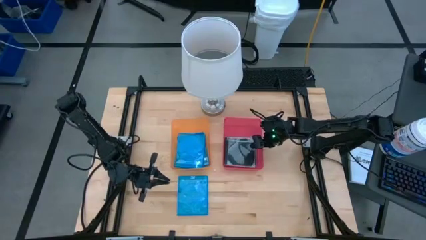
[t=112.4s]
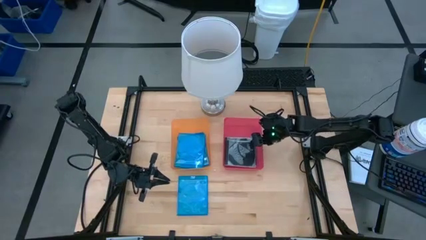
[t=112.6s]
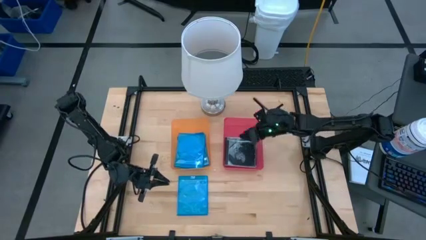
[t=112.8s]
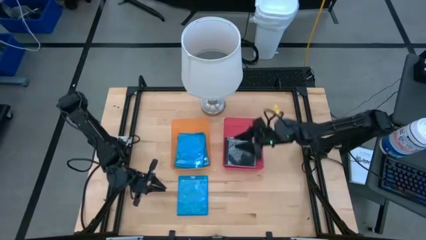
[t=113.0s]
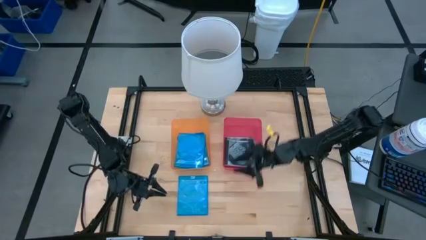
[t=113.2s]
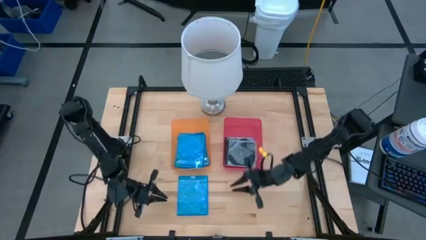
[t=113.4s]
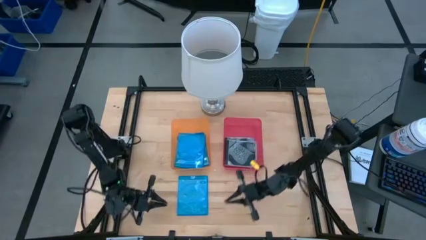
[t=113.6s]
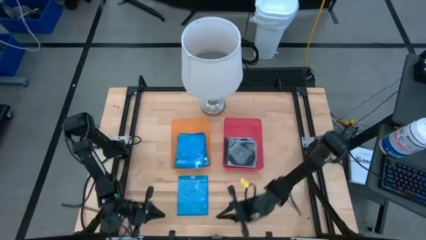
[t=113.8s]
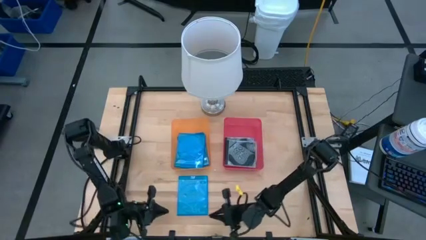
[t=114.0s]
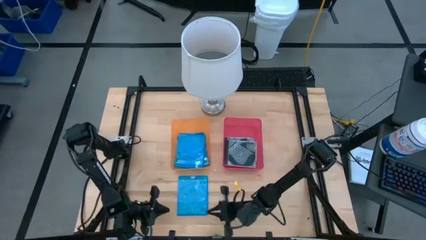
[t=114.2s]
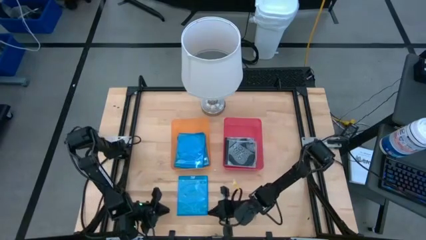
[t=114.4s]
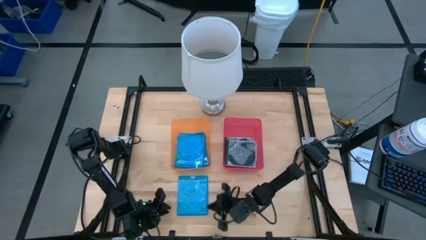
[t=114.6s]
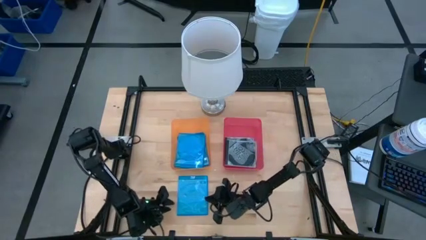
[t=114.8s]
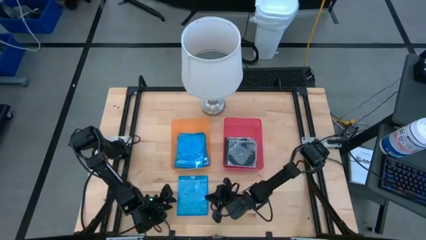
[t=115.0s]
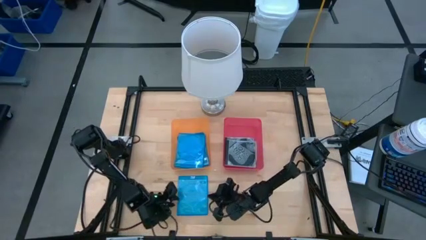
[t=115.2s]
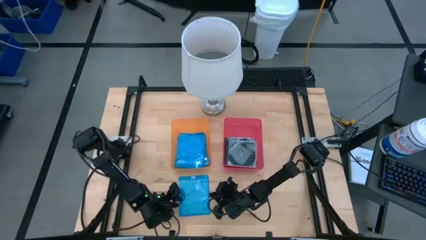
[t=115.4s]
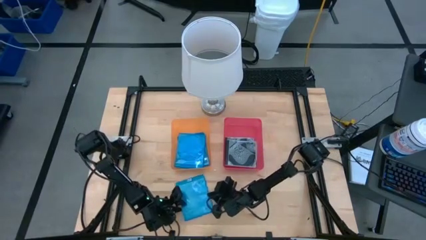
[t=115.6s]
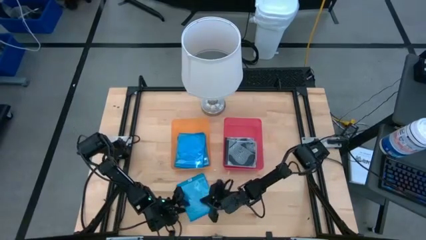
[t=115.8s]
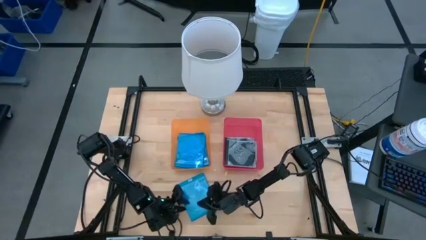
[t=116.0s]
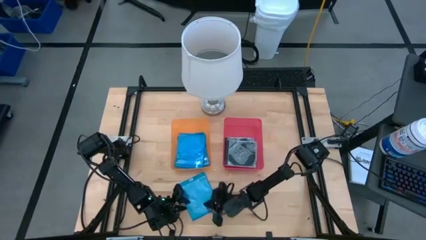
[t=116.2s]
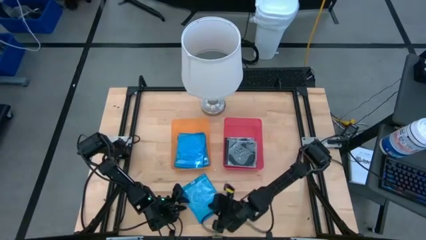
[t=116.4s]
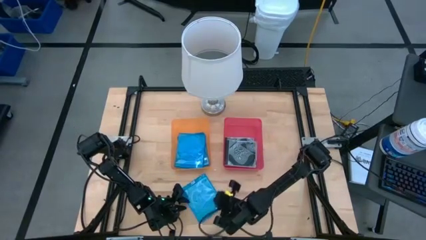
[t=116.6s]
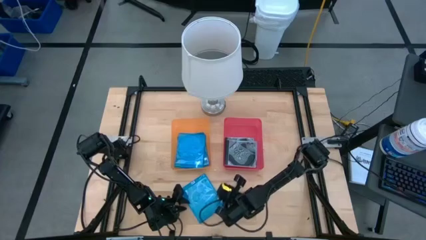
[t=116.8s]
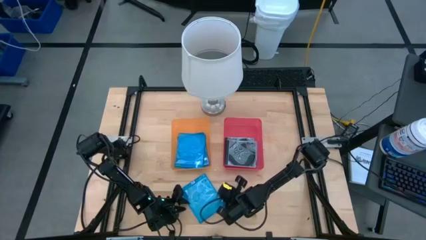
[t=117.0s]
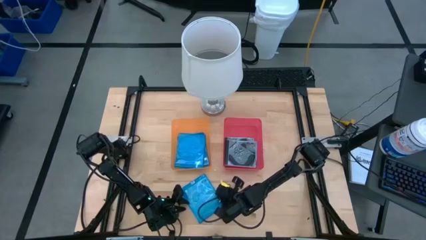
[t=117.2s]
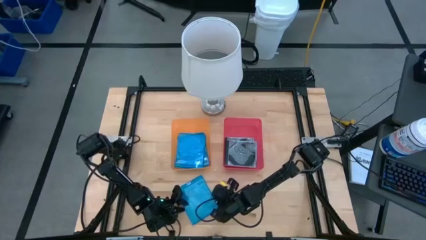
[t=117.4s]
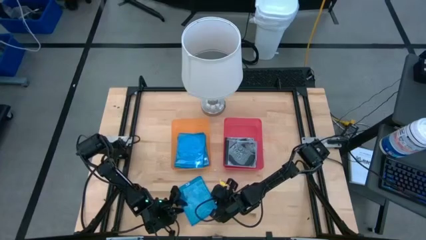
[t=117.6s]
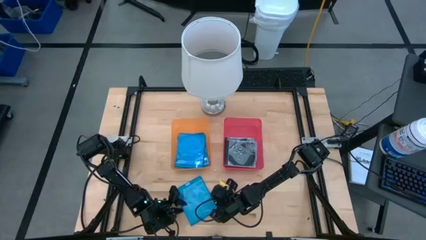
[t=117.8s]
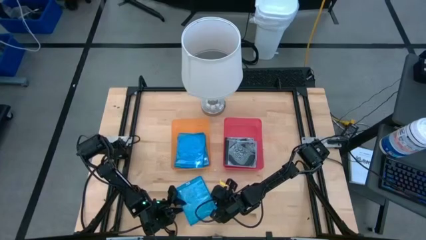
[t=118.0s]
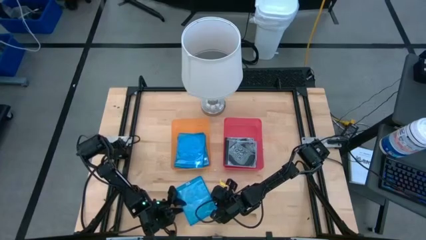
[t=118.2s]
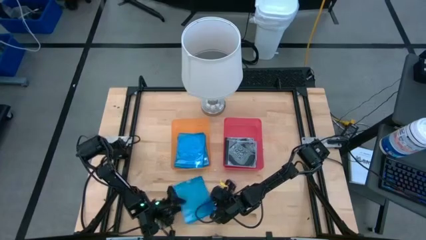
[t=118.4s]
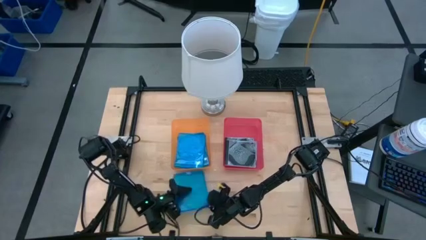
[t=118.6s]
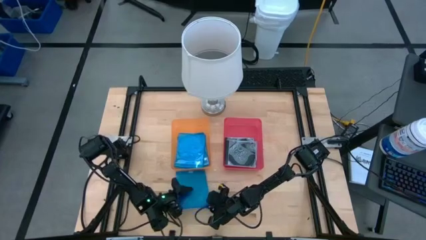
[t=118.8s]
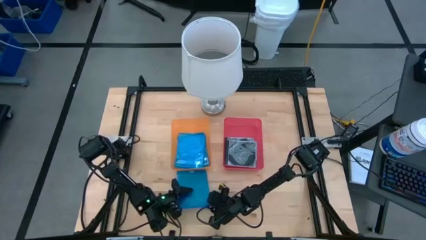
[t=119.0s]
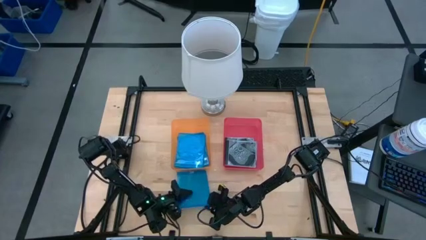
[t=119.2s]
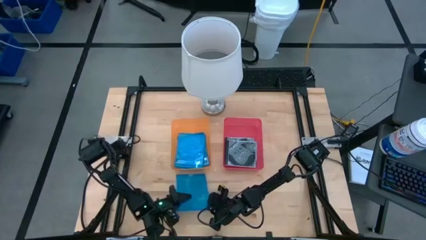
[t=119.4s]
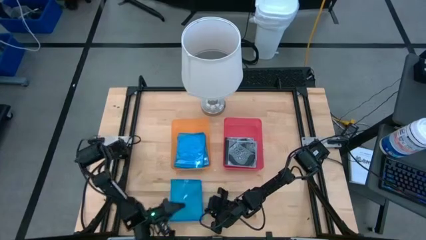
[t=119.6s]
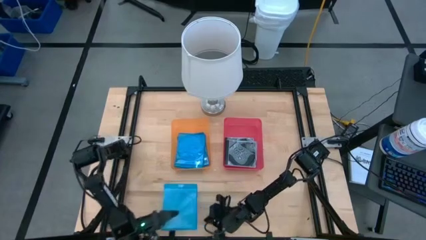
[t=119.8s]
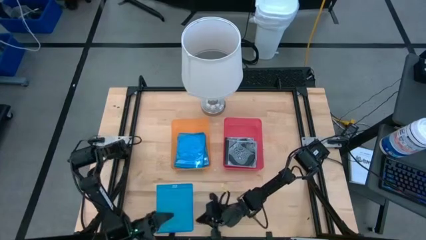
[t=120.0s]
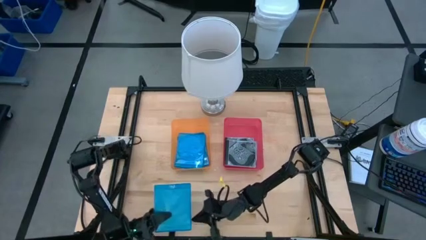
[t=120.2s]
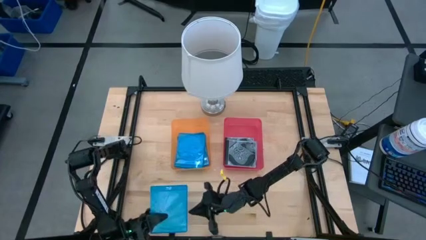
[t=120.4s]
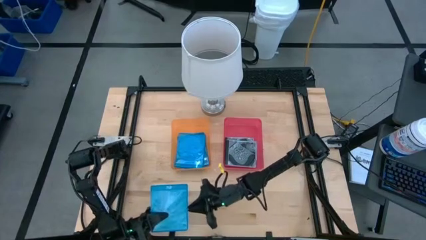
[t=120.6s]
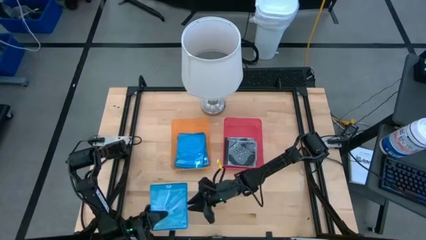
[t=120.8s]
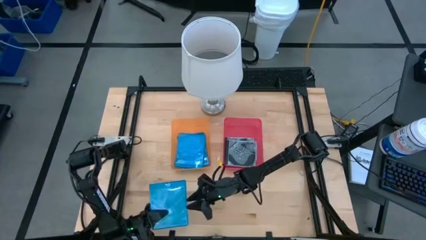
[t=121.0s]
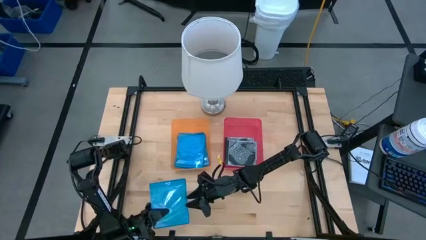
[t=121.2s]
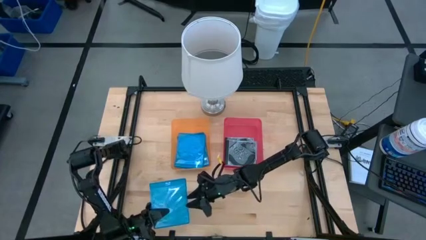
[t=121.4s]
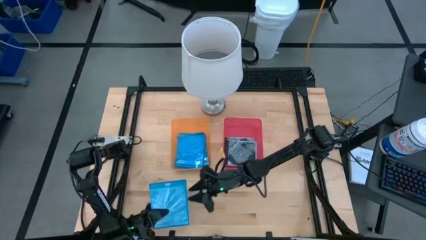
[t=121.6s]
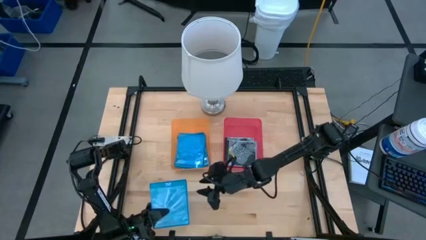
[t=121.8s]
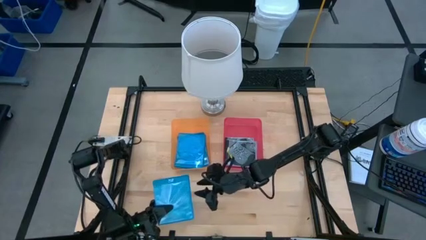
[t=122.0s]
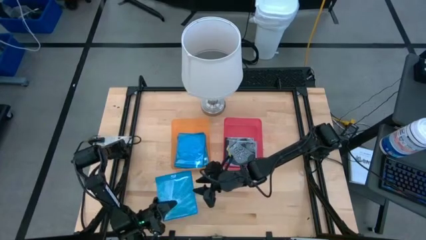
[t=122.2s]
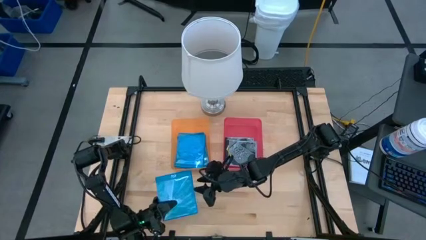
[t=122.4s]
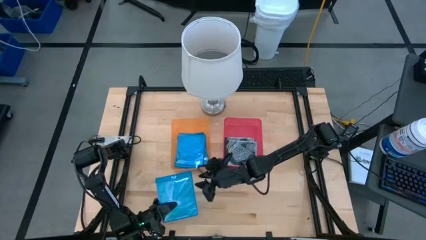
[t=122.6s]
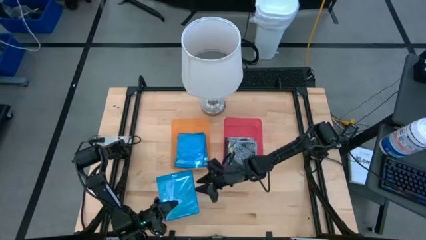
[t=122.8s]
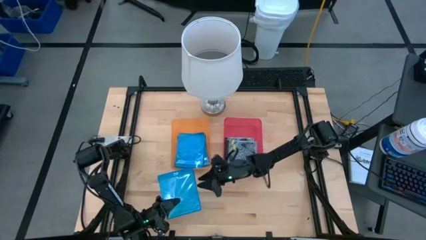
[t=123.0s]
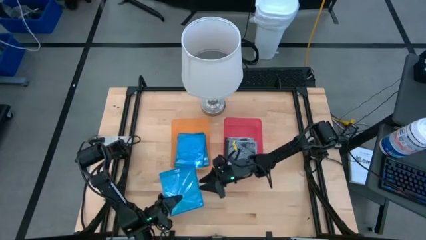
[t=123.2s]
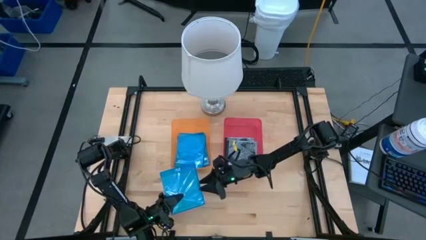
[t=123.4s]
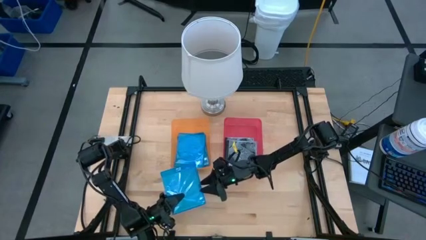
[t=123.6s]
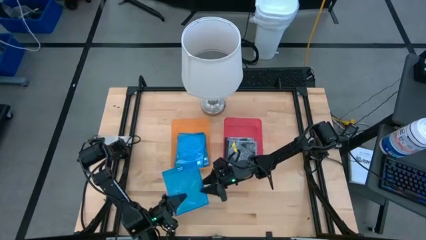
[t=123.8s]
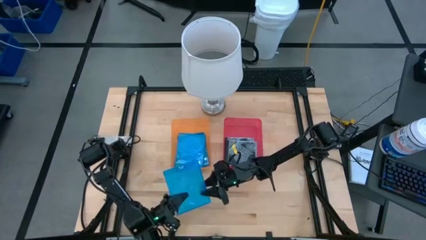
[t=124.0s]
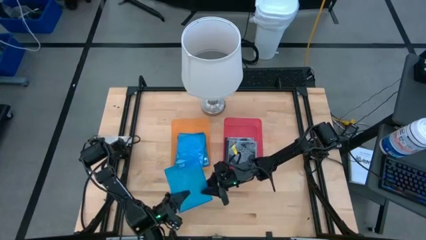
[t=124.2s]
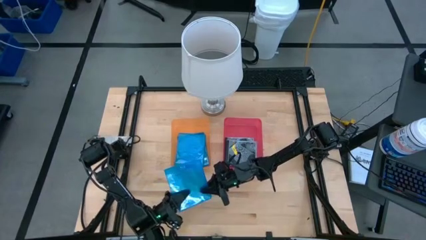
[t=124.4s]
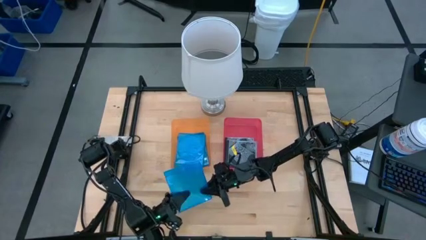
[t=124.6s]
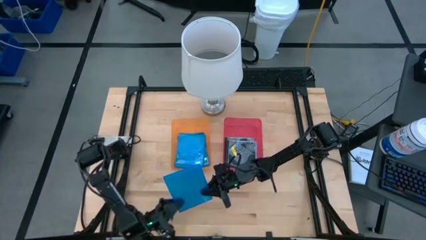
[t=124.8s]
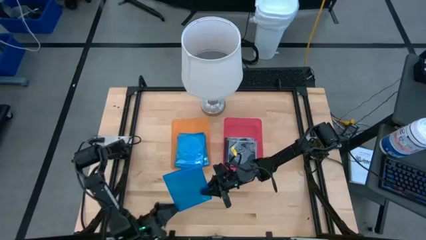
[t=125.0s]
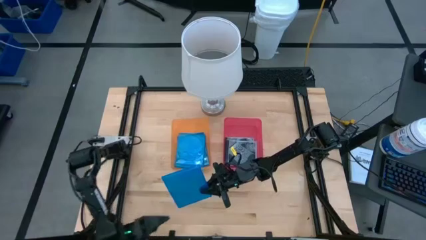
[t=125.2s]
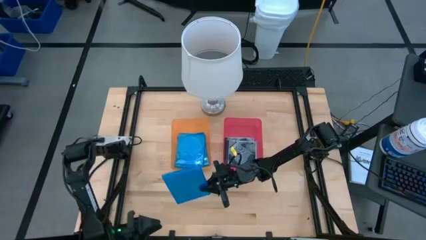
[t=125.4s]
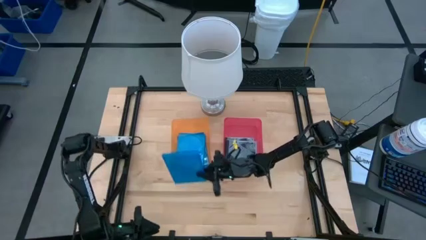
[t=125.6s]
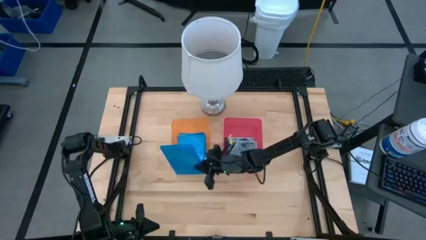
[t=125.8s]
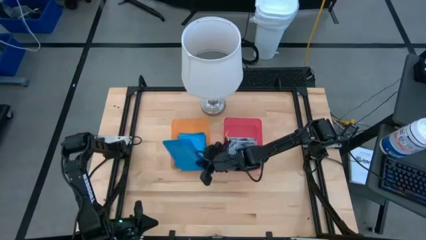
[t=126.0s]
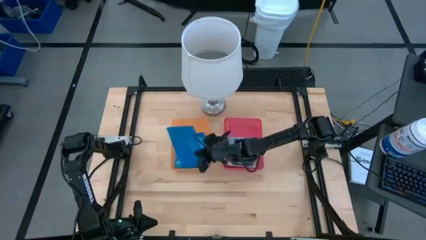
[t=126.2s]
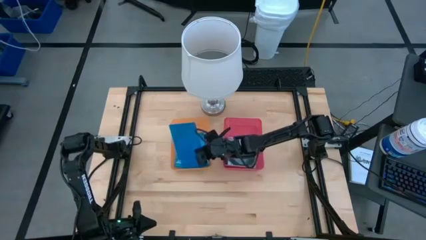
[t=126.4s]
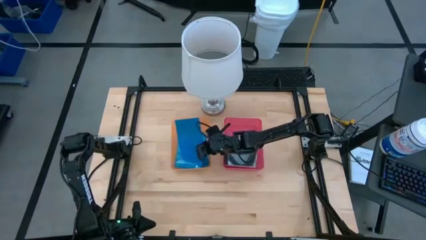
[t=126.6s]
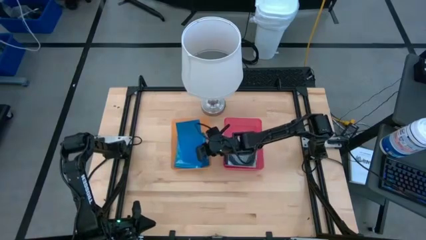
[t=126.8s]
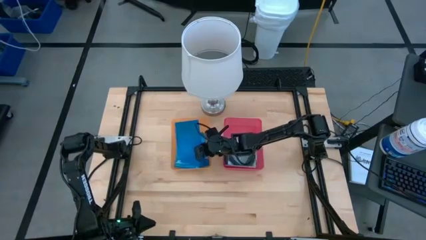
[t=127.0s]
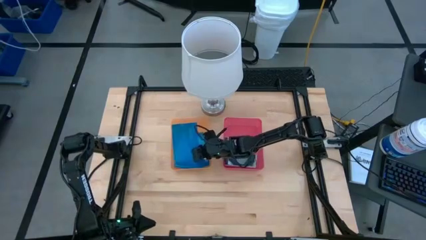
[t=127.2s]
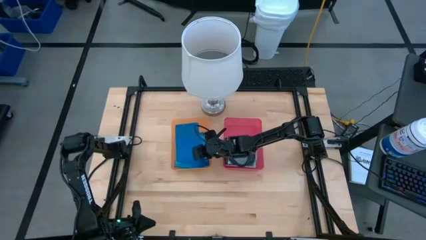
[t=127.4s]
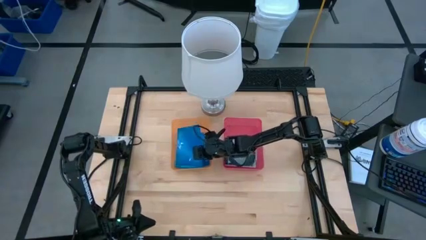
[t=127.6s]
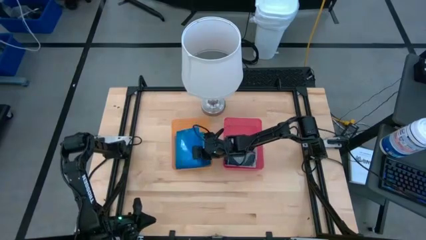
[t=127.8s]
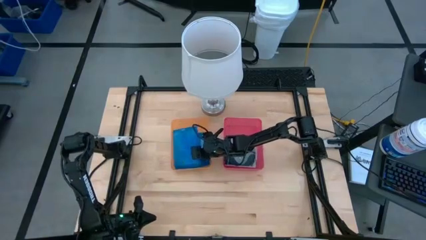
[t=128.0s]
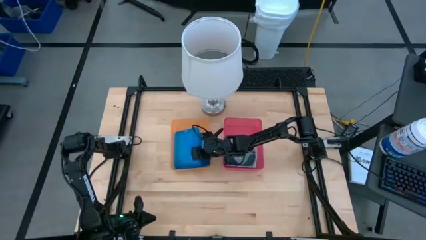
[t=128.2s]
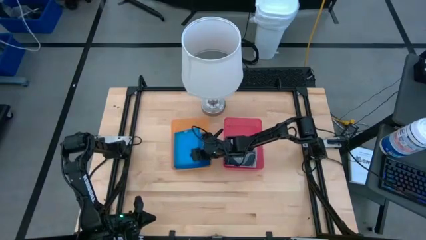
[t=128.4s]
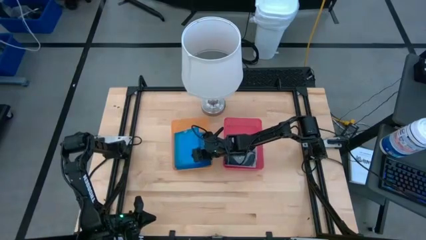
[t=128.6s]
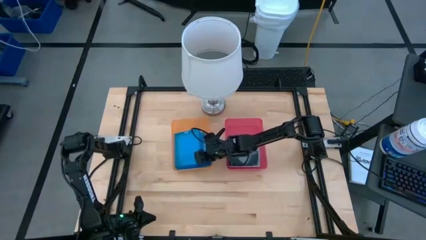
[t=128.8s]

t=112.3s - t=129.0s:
Task: Pick & place jewel cases by type
Put the blue CD case into the orange bin
